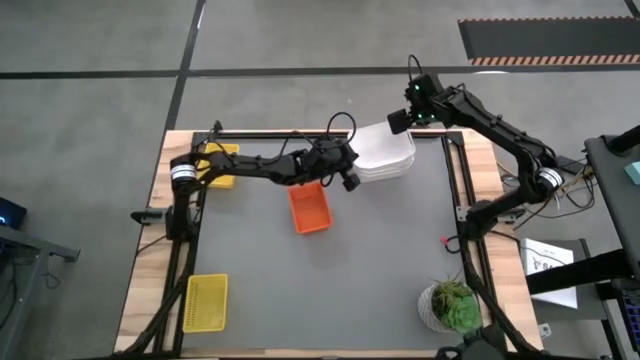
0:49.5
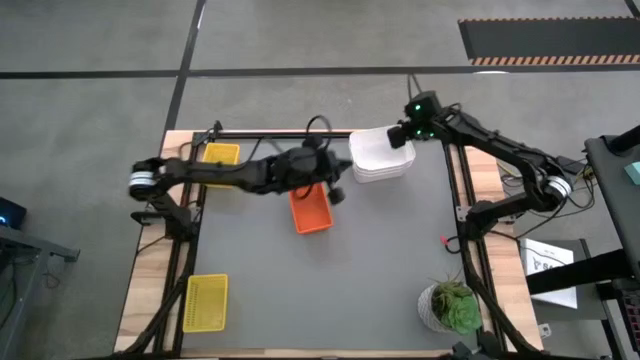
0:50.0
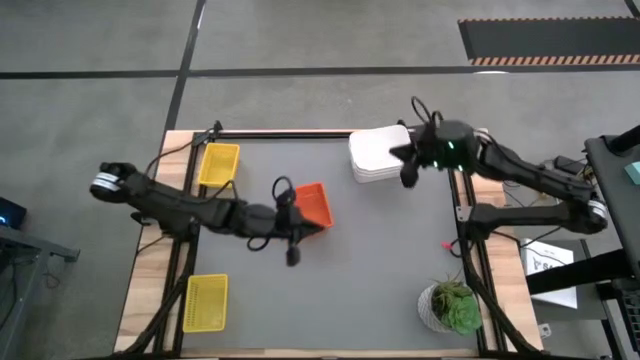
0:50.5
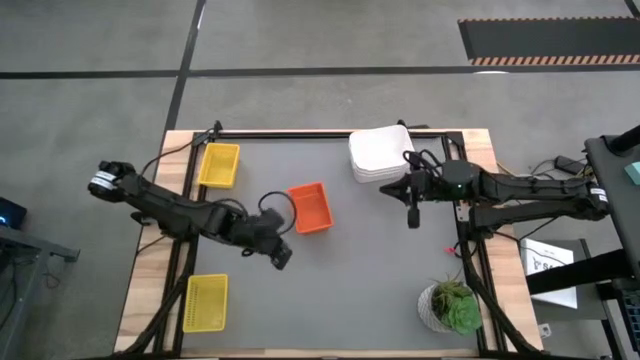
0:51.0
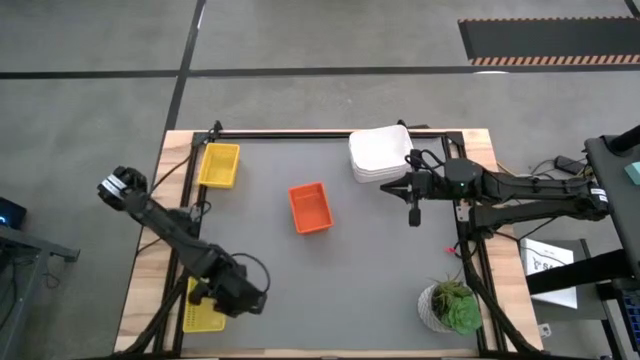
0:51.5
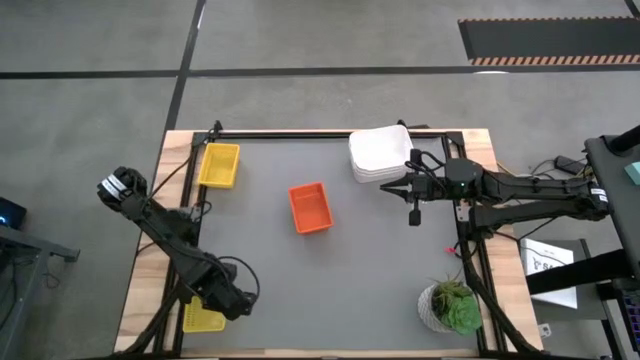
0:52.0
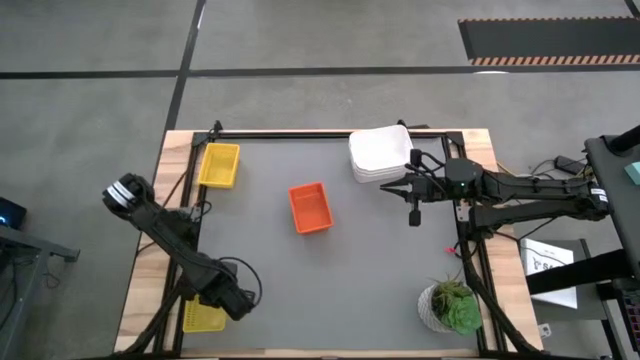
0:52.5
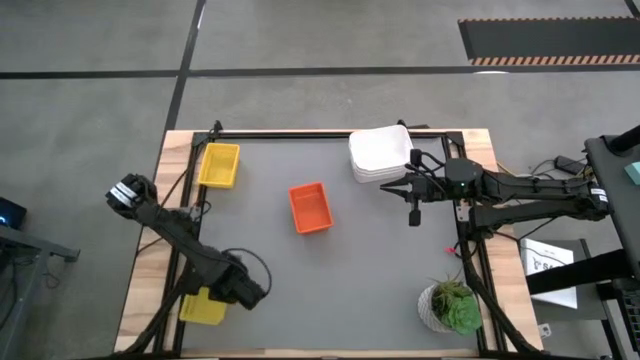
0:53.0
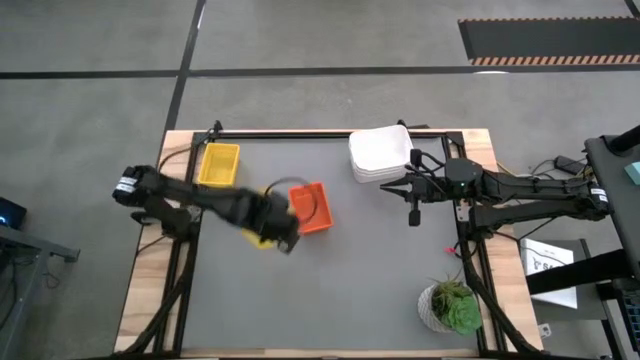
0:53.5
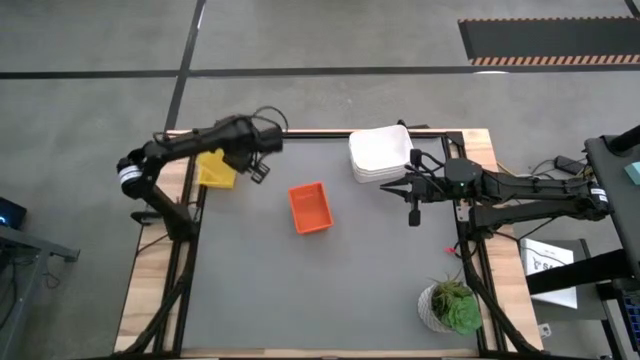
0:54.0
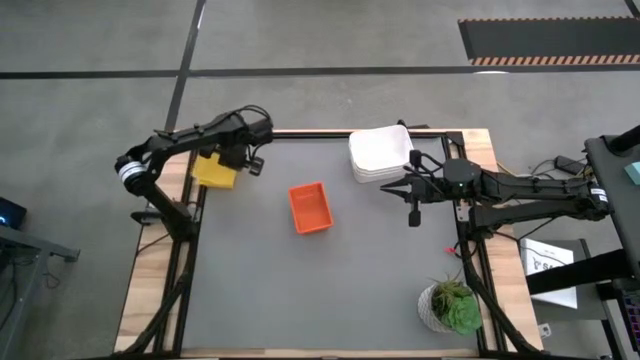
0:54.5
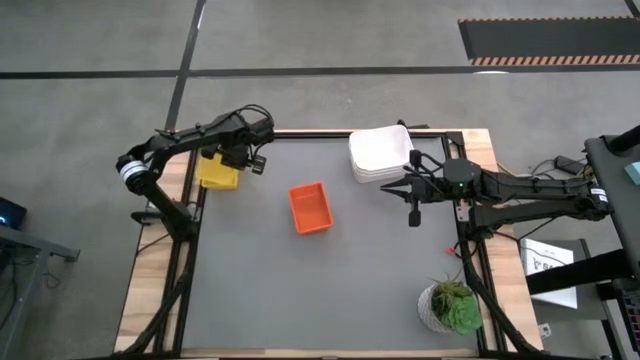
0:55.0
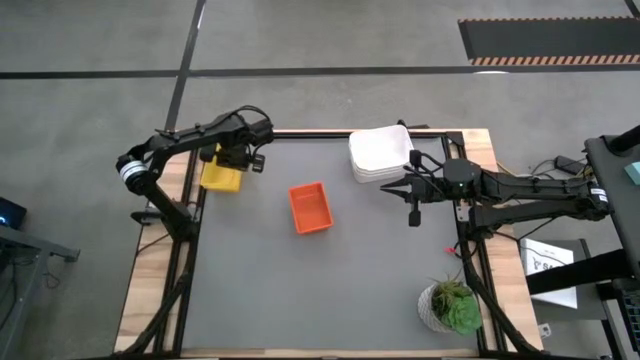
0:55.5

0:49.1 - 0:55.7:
Stack the bottom yellow bin on top of the top yellow bin

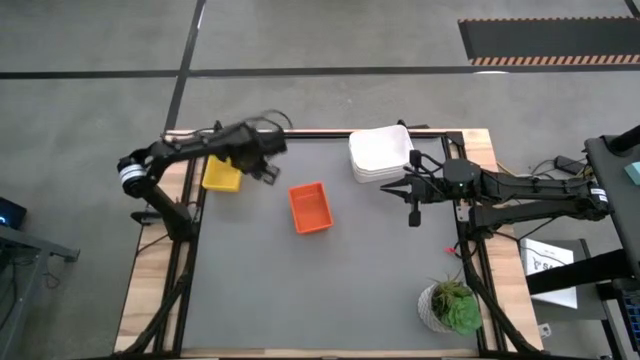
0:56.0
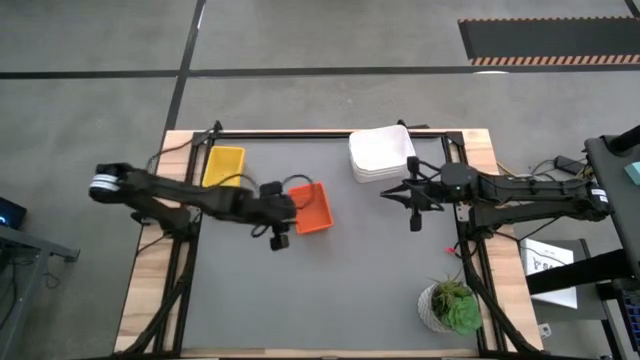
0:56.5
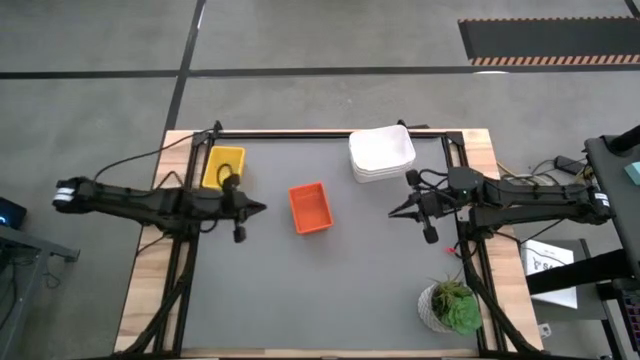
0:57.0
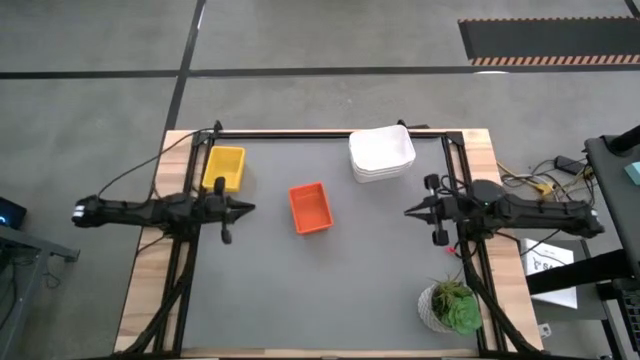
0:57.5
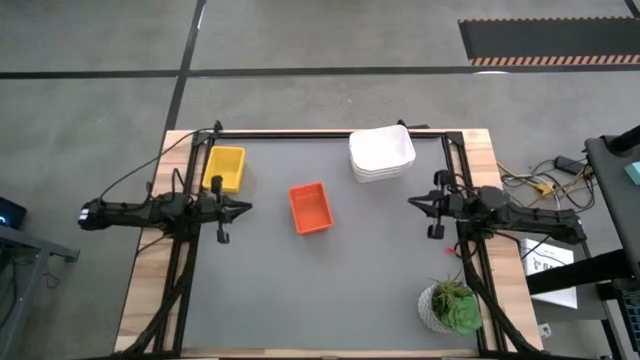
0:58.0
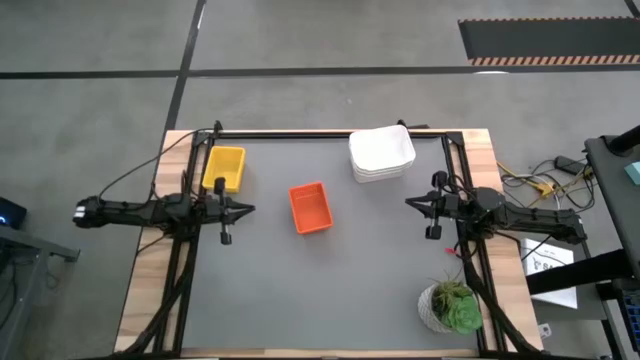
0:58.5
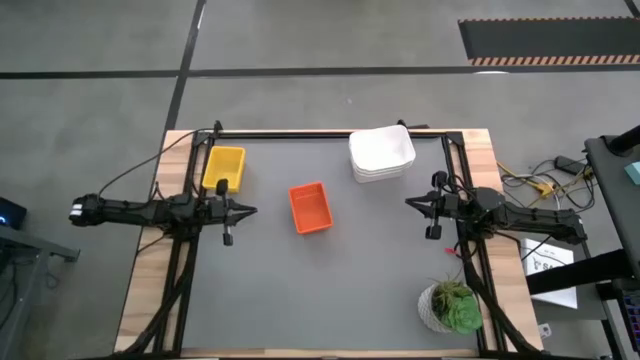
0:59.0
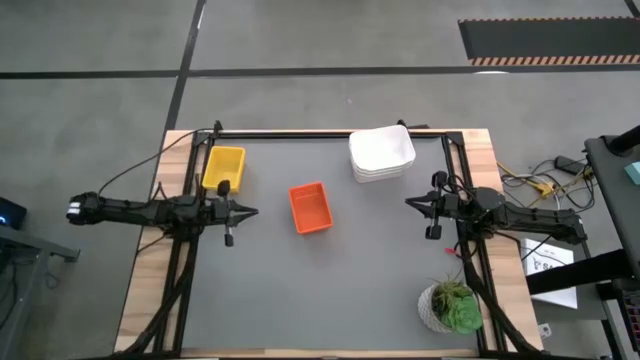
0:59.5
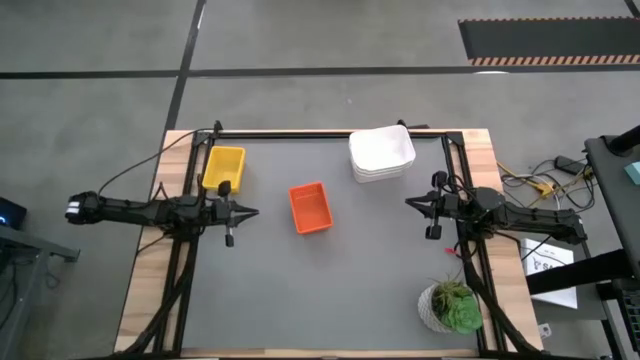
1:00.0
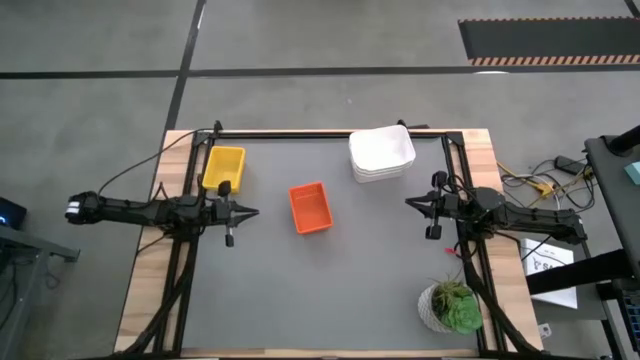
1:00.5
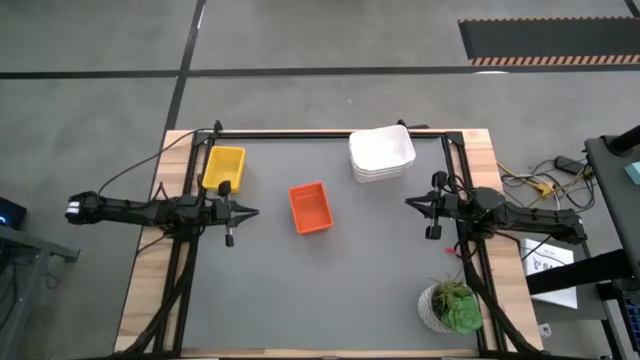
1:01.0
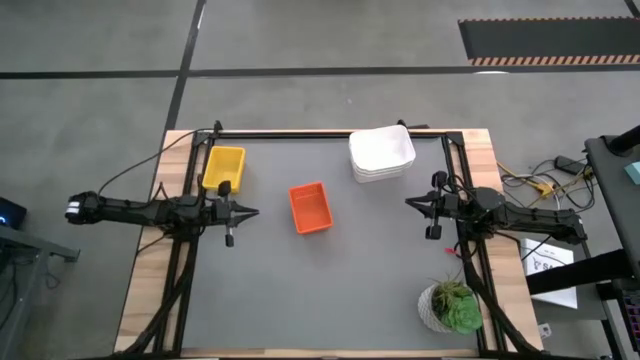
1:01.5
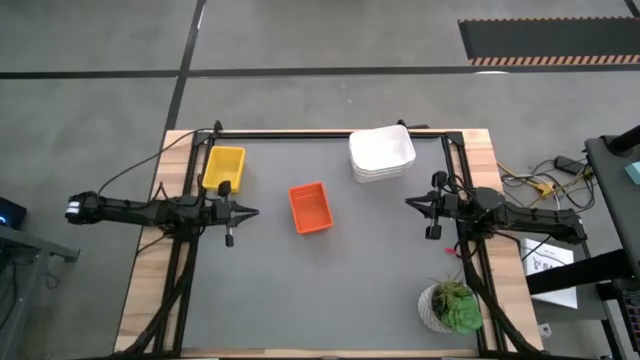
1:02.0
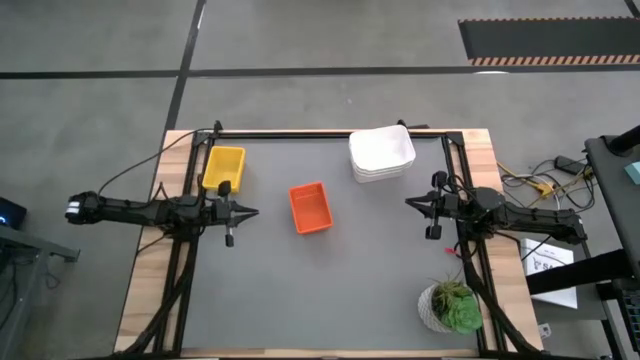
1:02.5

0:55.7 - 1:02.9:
Return to Home Position
